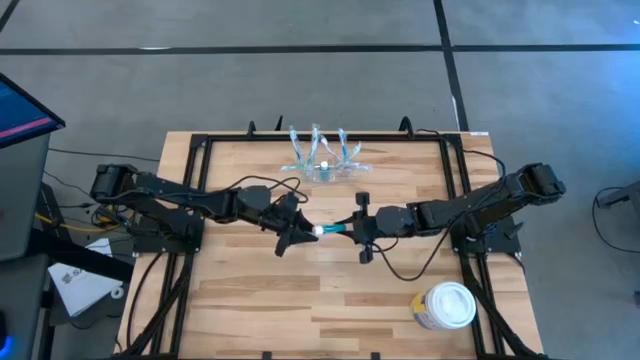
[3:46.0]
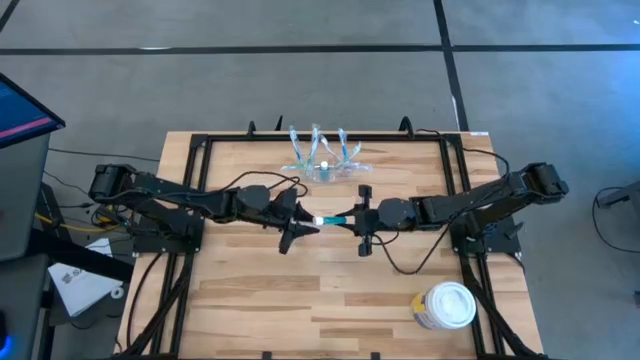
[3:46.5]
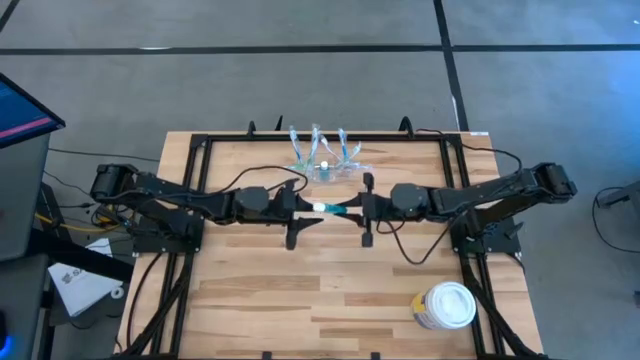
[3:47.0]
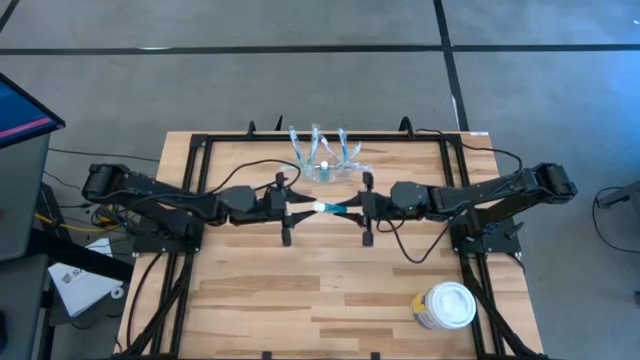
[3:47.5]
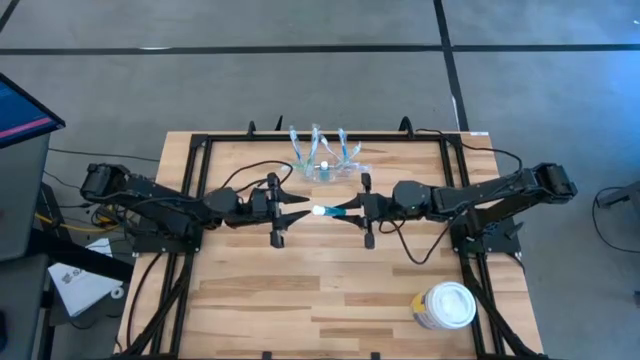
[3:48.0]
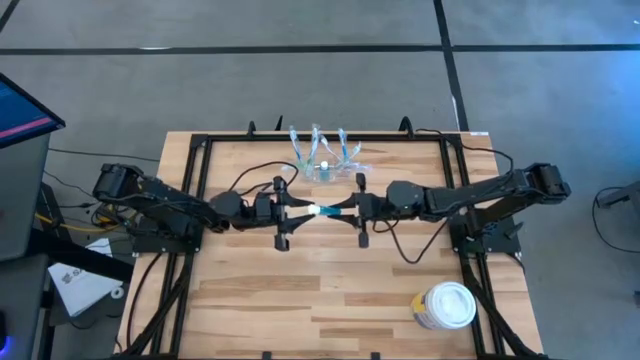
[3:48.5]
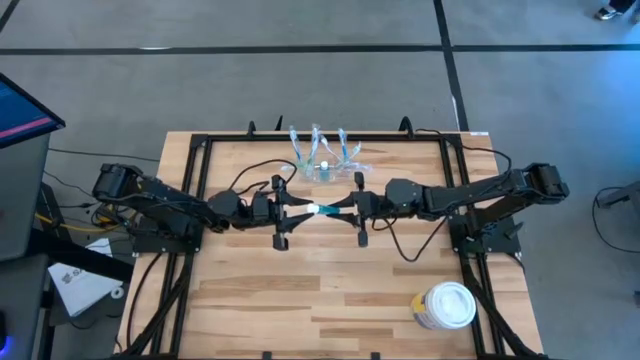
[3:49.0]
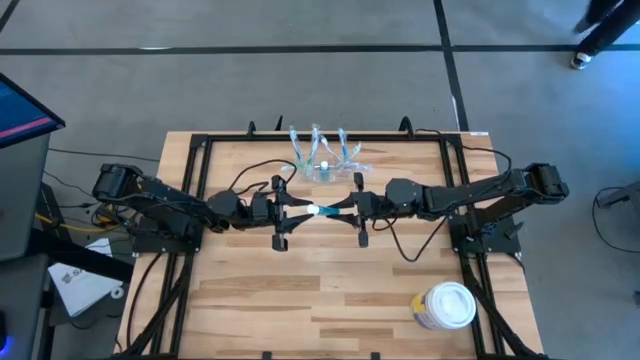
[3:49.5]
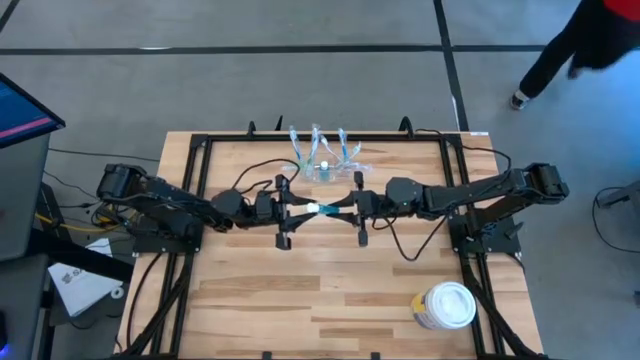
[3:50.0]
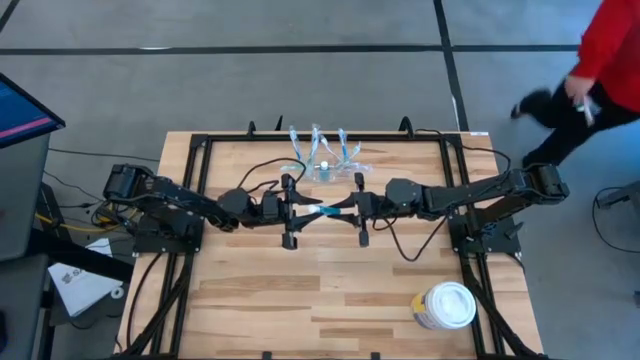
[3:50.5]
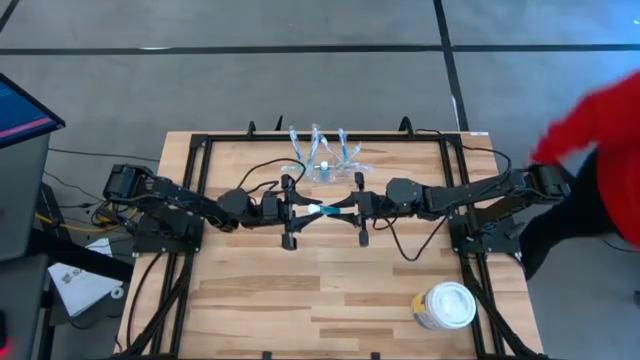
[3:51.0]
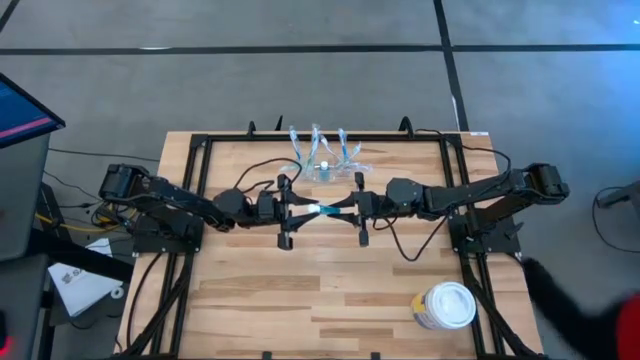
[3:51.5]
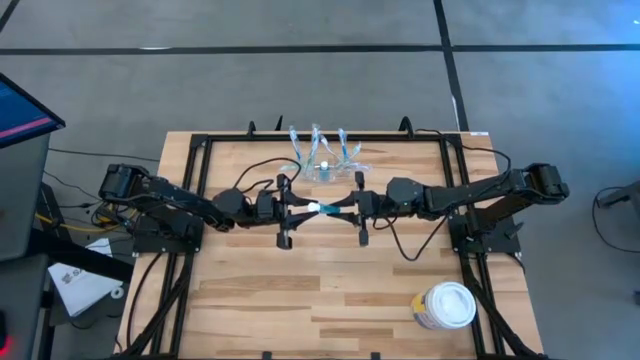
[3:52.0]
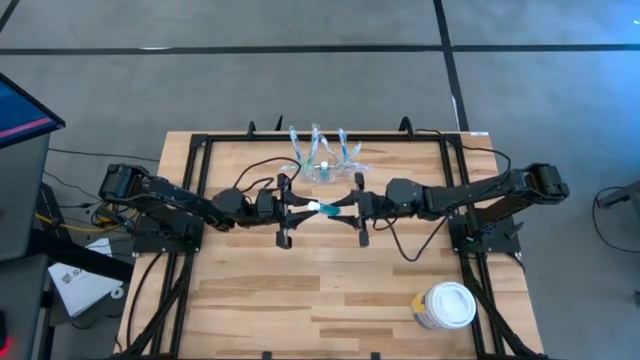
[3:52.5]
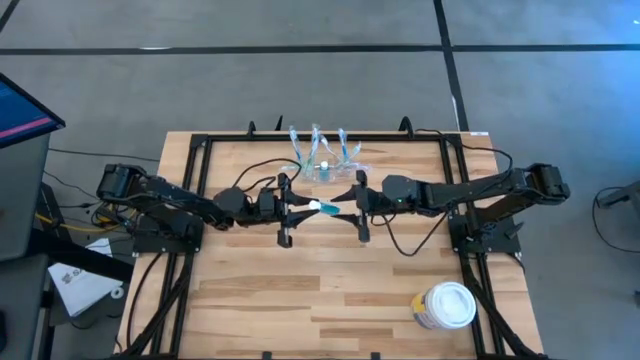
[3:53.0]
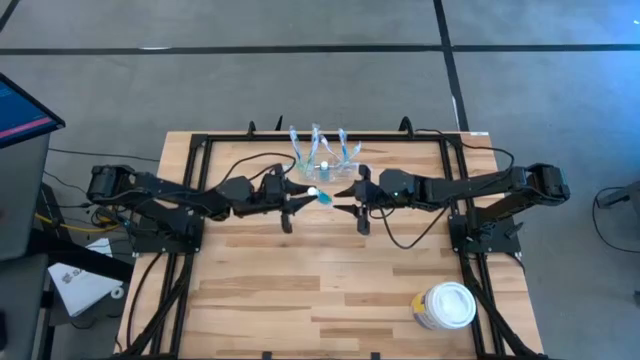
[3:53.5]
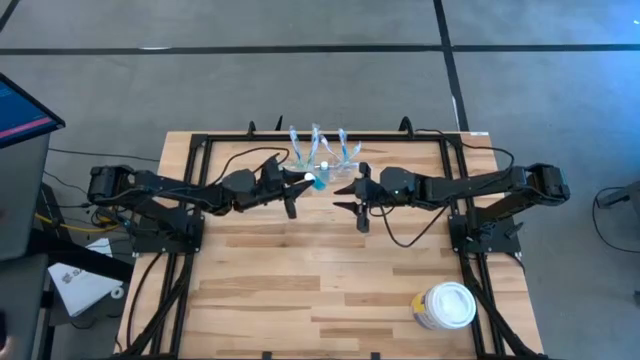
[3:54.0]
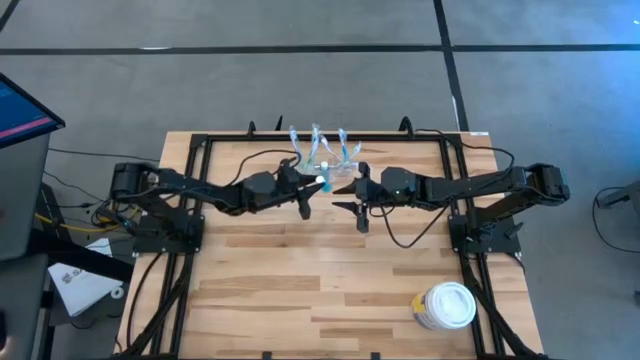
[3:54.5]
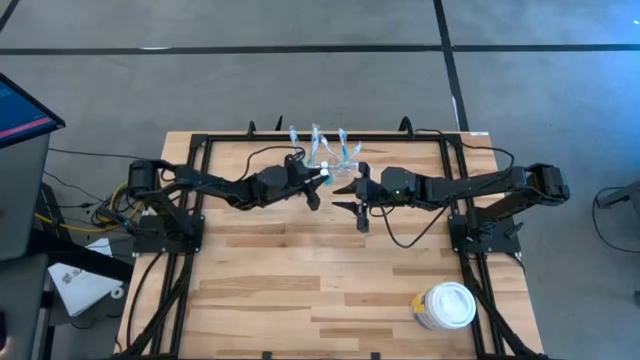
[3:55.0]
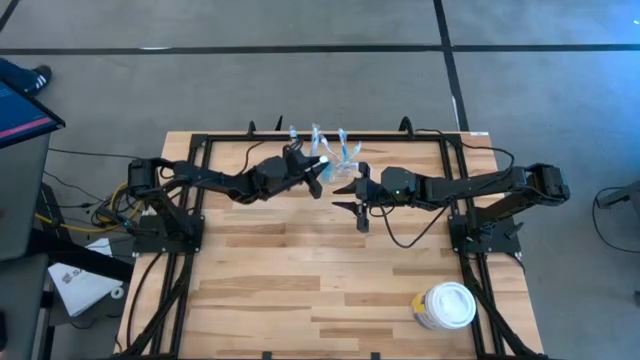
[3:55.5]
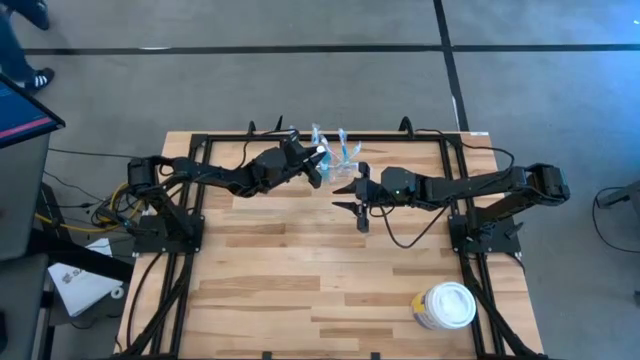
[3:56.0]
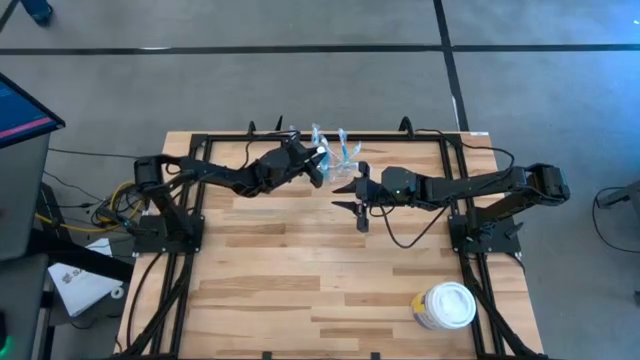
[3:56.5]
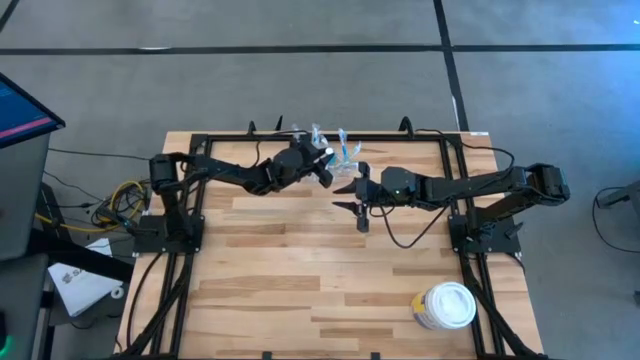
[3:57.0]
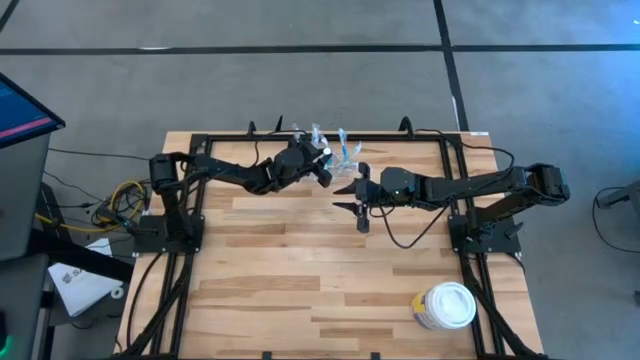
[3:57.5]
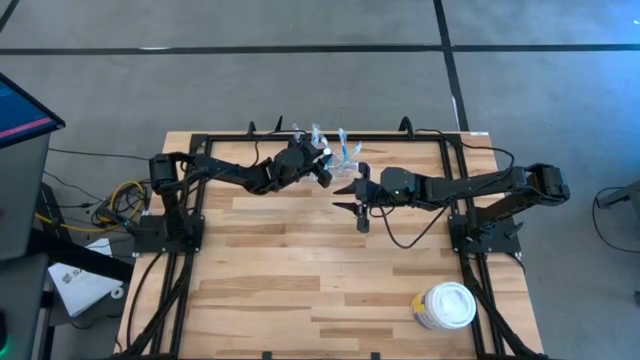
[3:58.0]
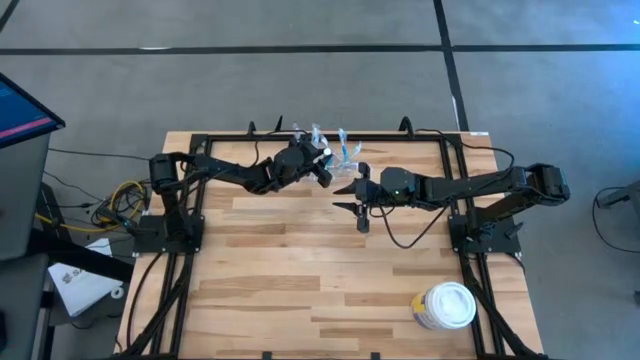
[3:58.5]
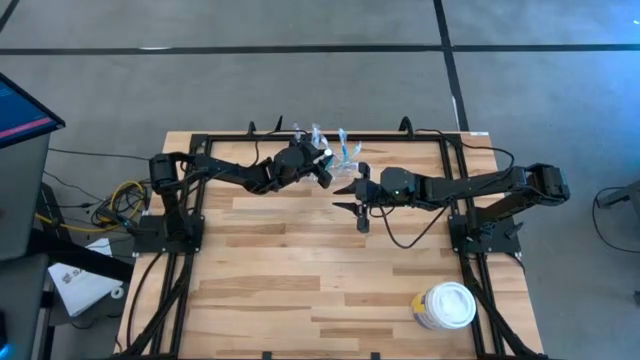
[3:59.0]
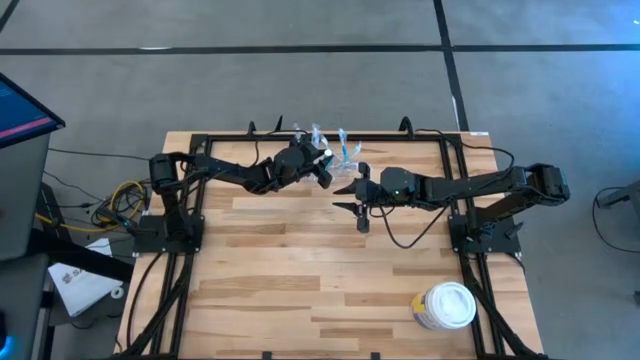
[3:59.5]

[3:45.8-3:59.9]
Task: Pick & Place toothbrushing station
Put the blue mouthwash into the transparent organizer

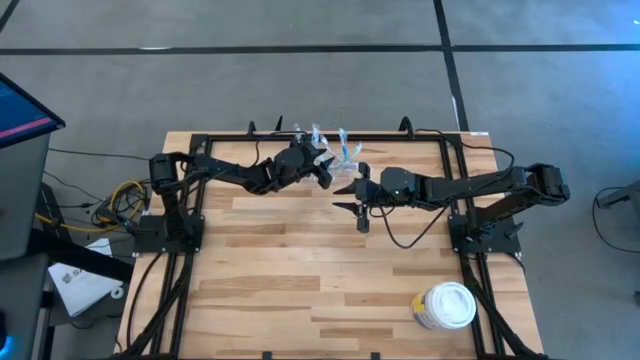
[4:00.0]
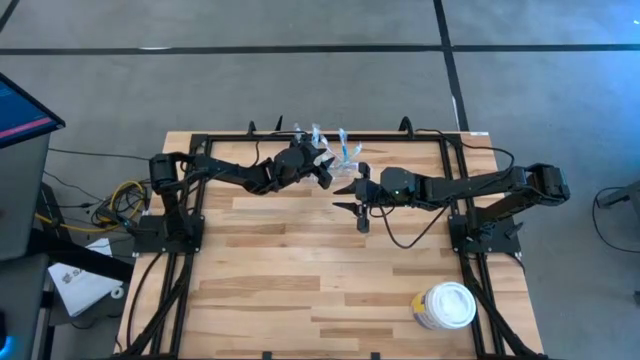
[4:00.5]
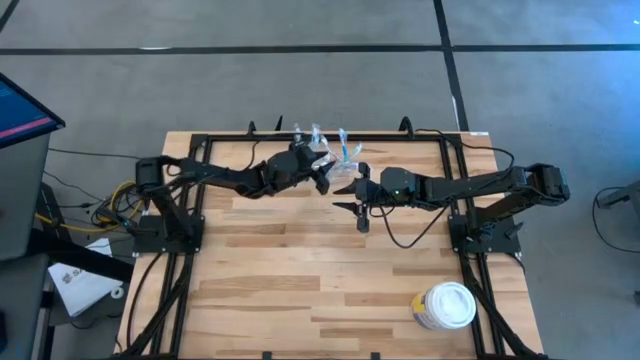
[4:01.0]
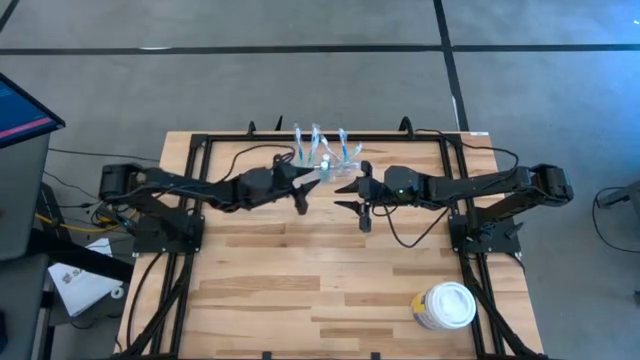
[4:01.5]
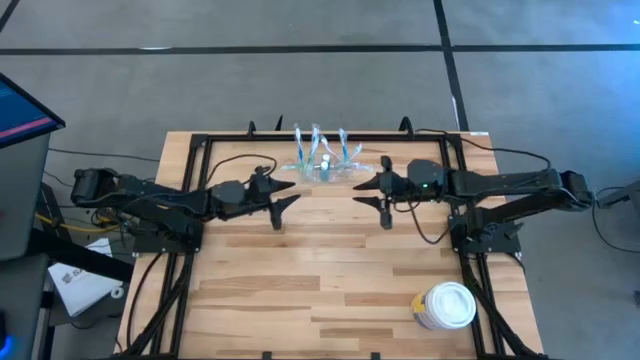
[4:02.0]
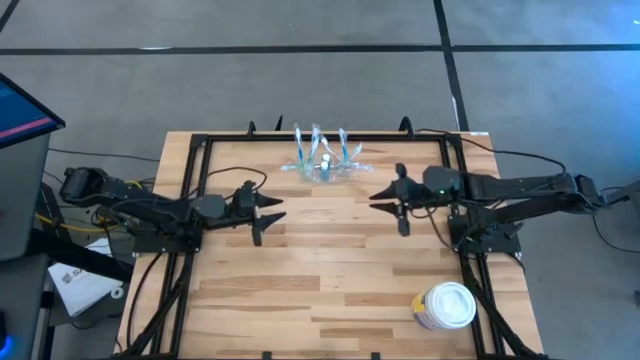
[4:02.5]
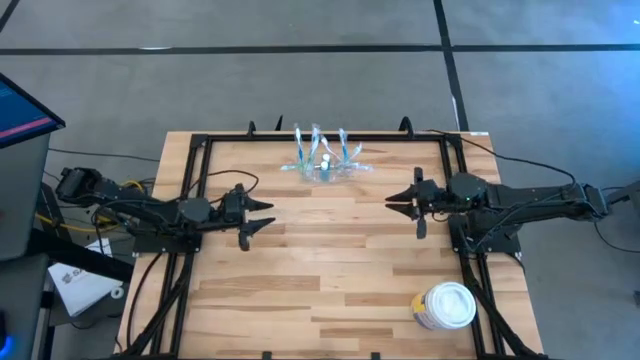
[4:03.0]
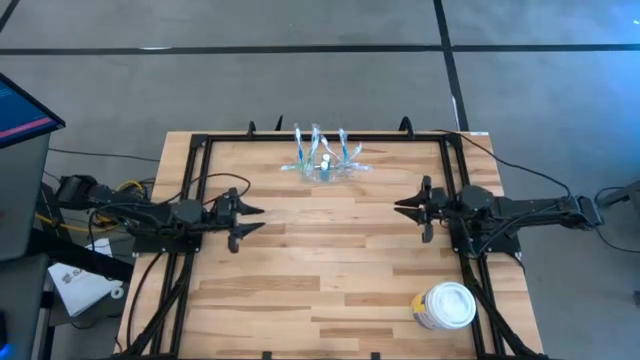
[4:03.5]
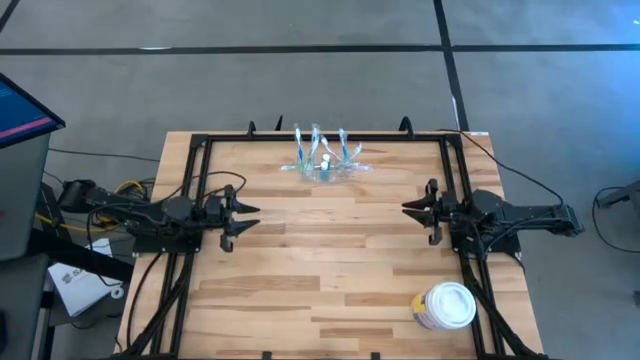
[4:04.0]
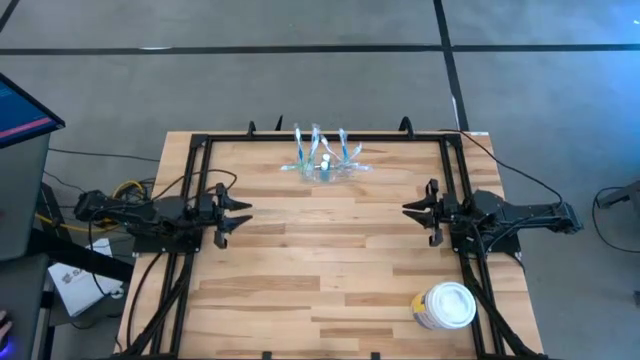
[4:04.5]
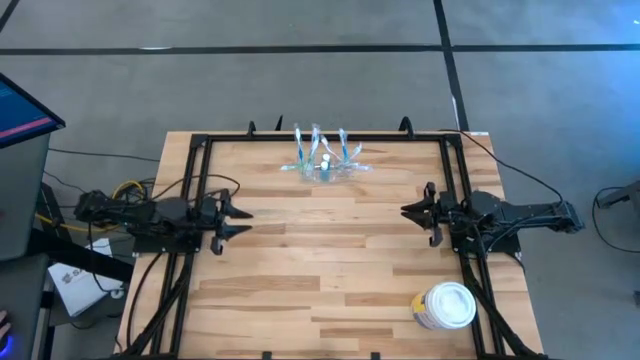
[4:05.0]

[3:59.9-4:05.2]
Return to Home Position
